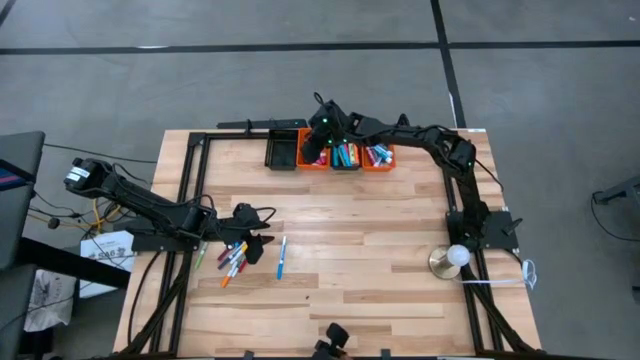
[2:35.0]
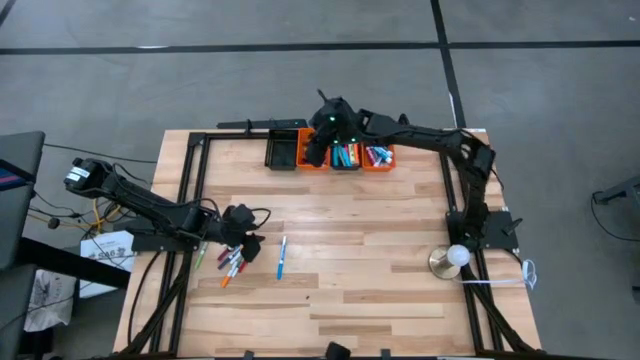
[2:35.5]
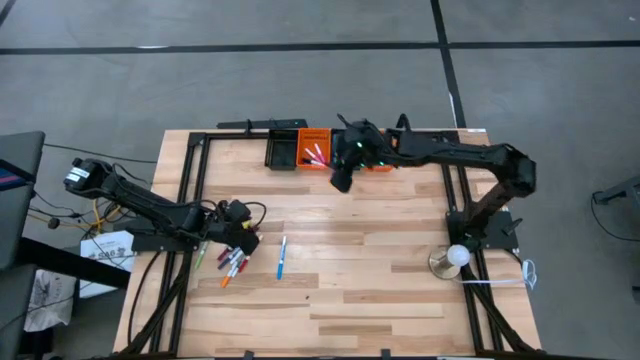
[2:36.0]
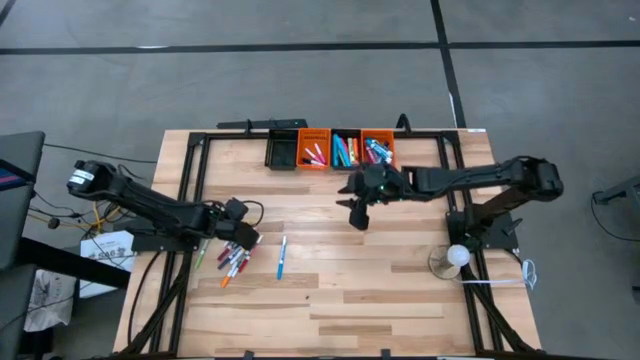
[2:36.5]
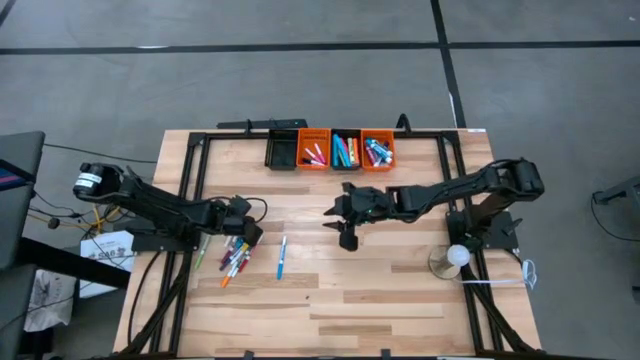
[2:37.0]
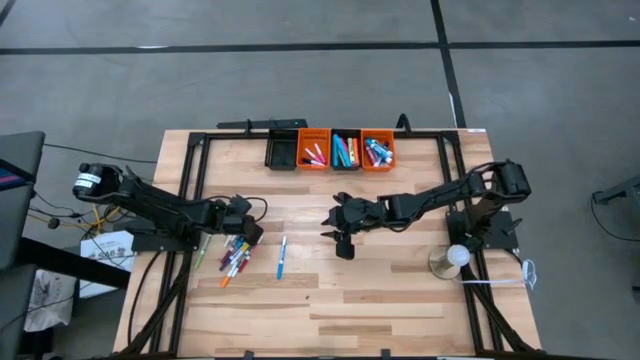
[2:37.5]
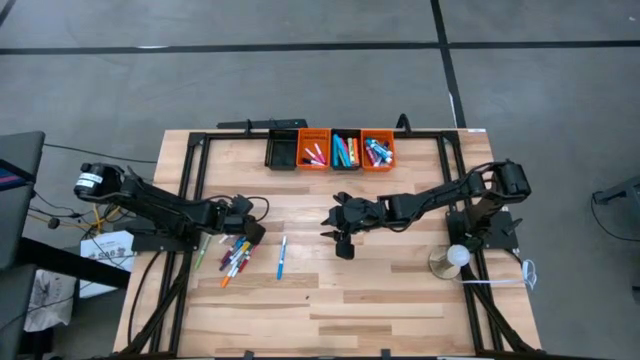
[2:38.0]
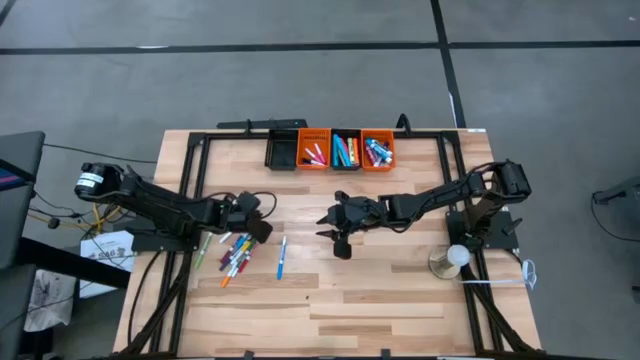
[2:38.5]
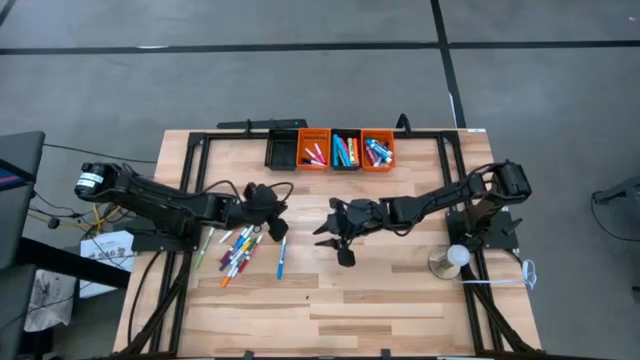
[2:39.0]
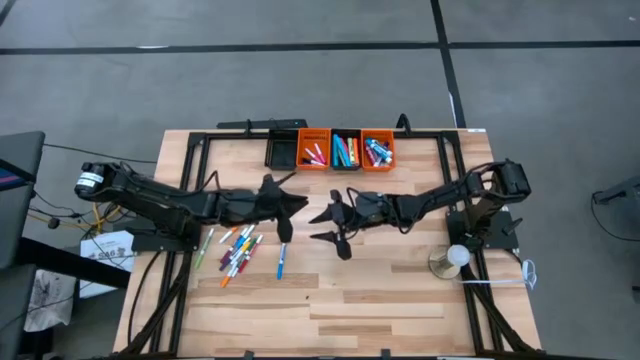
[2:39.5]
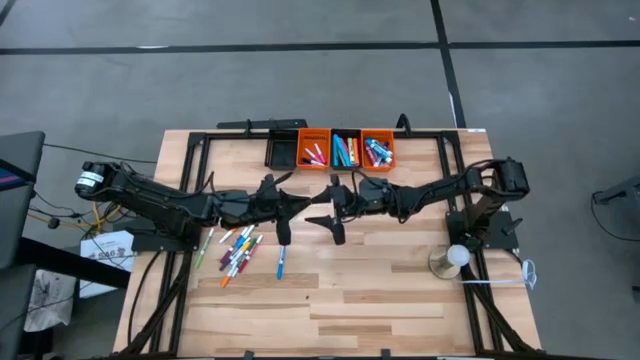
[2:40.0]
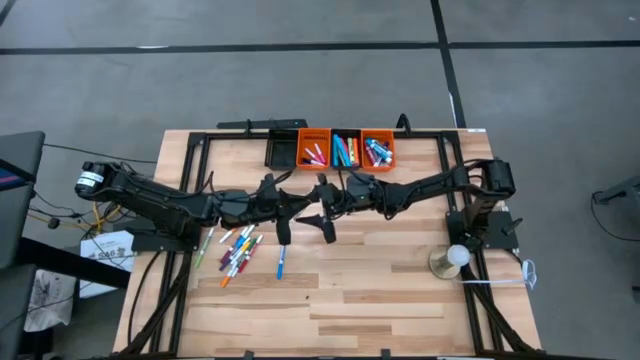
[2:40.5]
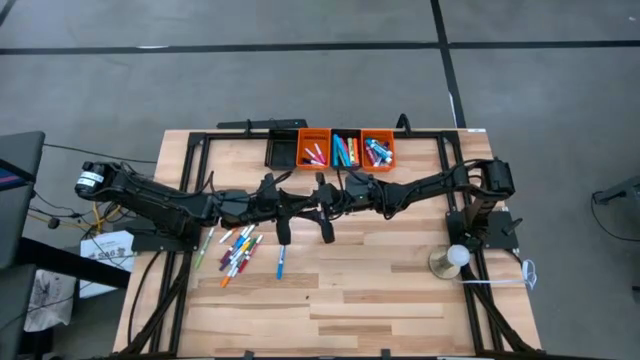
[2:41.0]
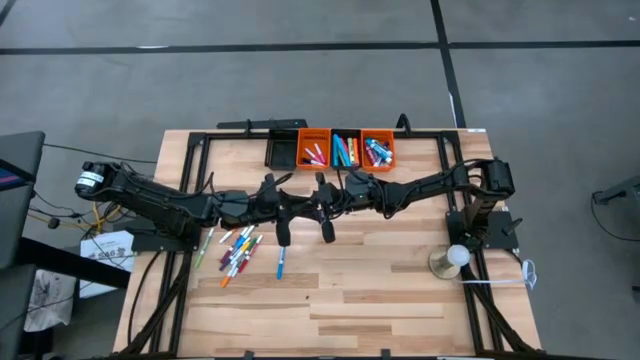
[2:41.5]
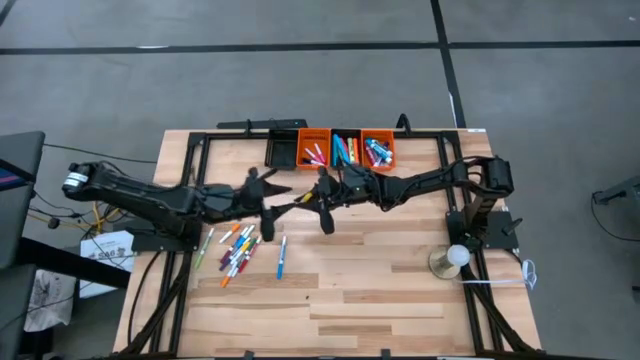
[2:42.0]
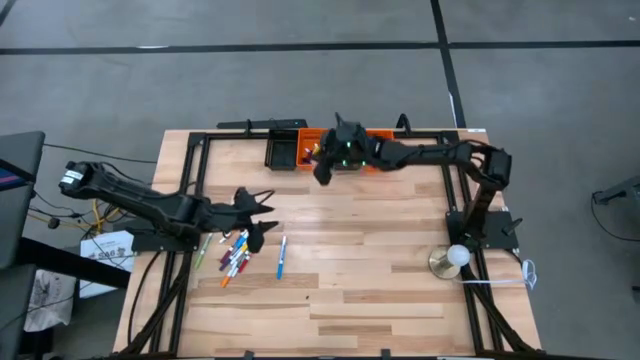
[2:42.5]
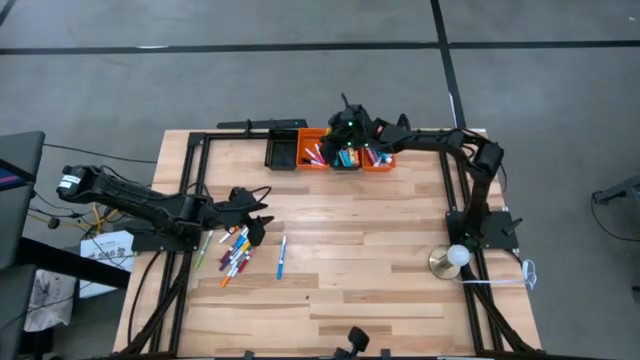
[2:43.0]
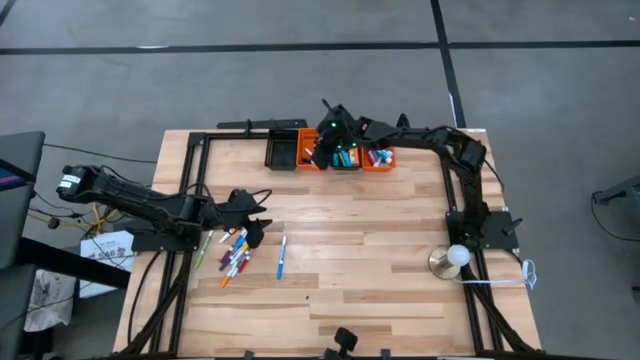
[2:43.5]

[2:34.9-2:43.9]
Task: Pick & Place Markers
Put the white yellow highlighter pen into the left orange bin

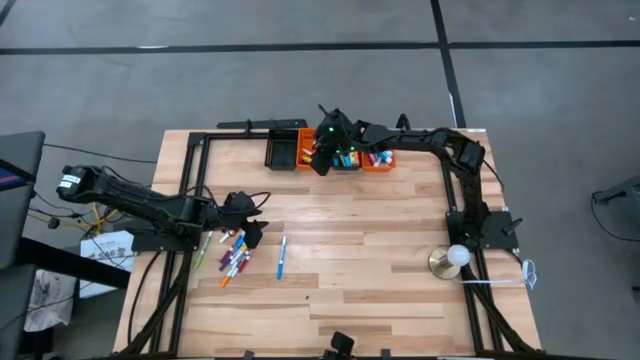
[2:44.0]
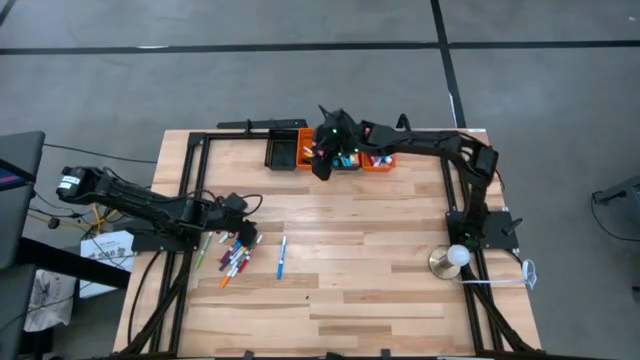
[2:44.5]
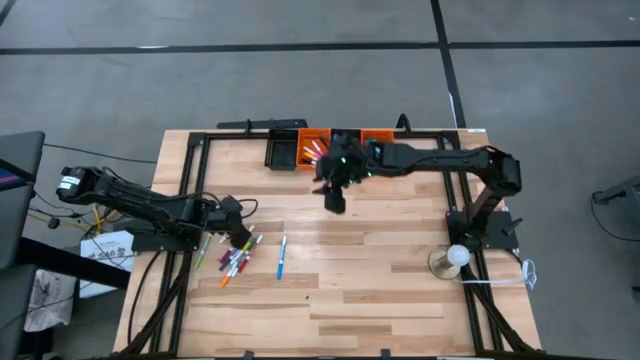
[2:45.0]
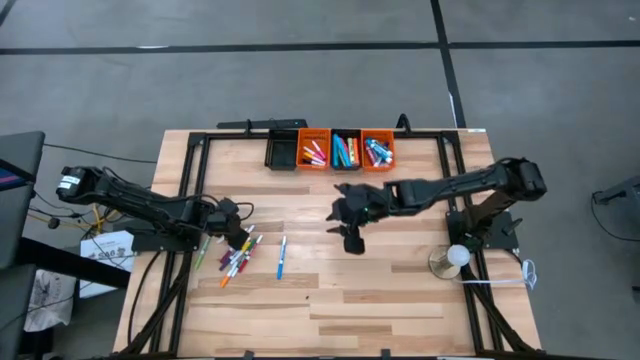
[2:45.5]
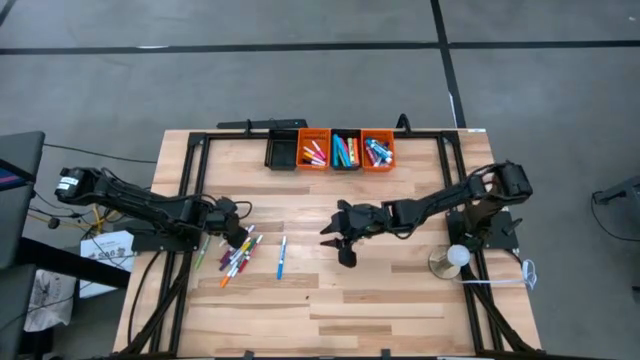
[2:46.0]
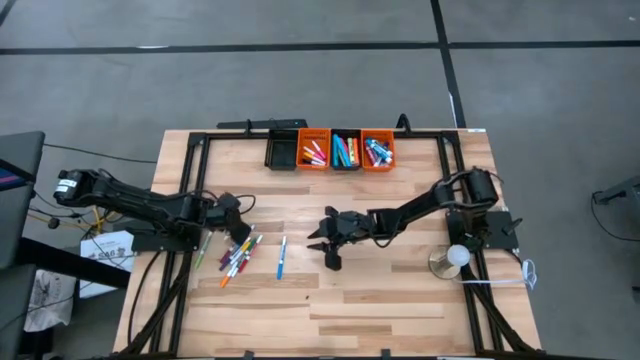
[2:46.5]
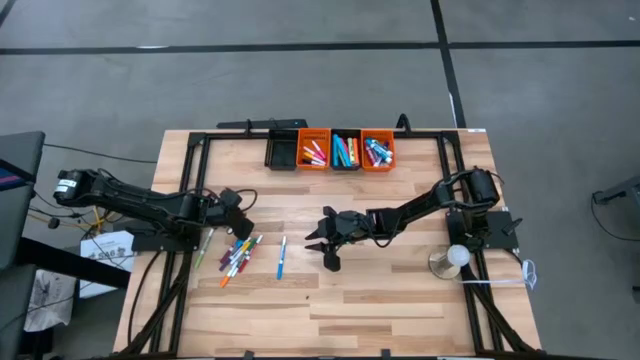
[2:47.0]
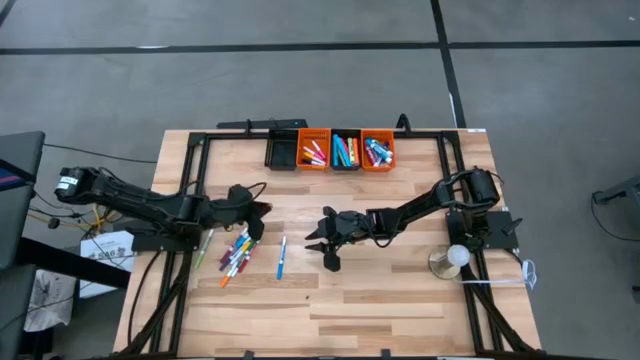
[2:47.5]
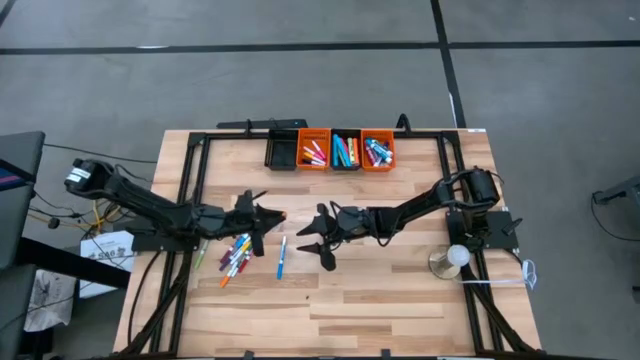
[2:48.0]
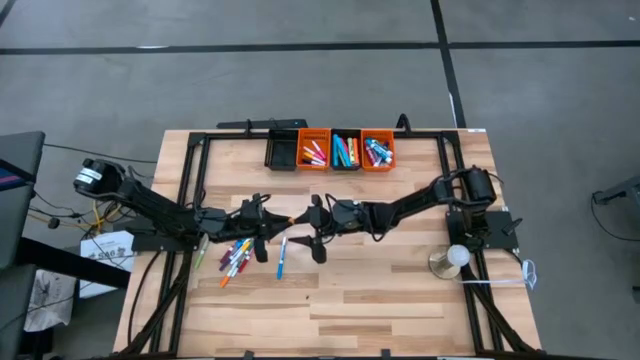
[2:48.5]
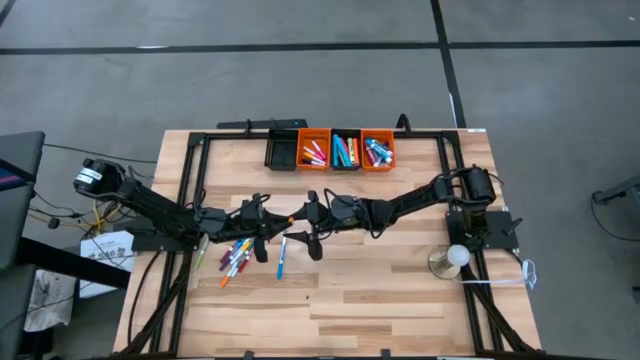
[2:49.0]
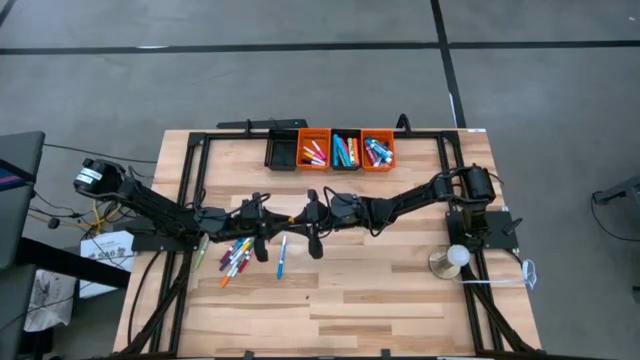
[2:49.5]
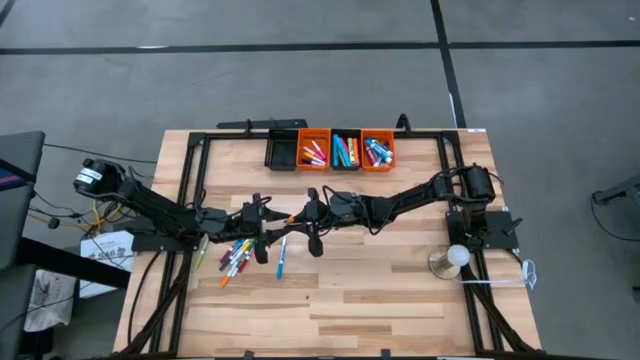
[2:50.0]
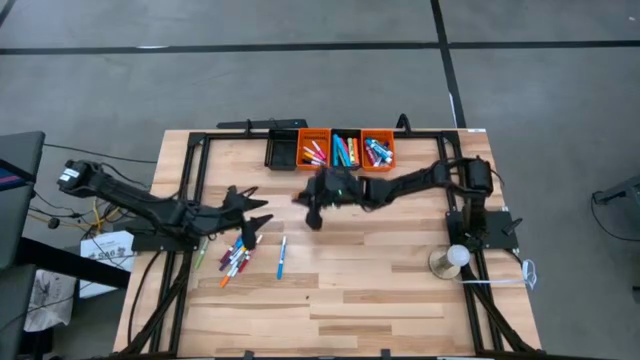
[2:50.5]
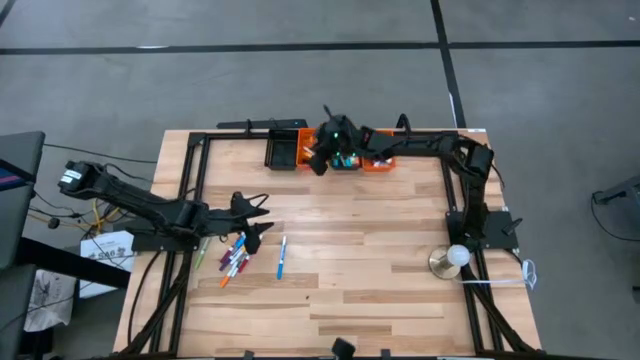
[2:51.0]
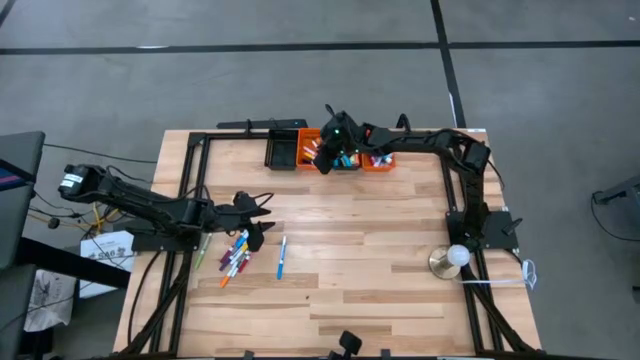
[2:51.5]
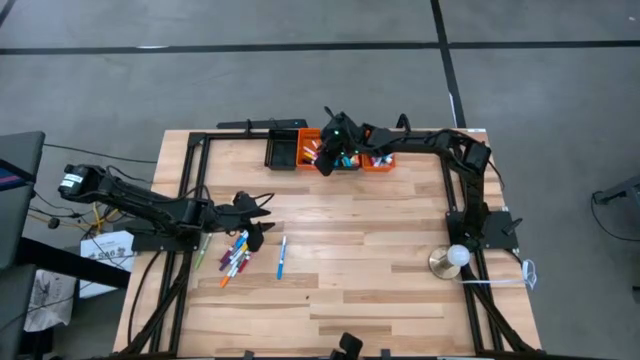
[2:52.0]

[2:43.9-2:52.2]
Put the white orange highlighter pen into the left orange bin

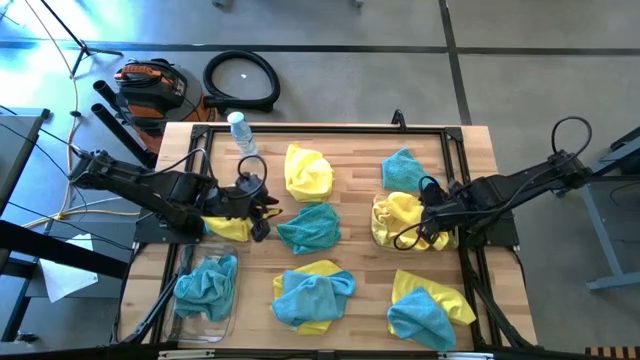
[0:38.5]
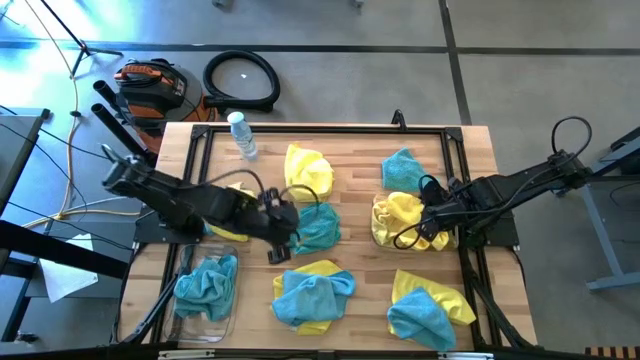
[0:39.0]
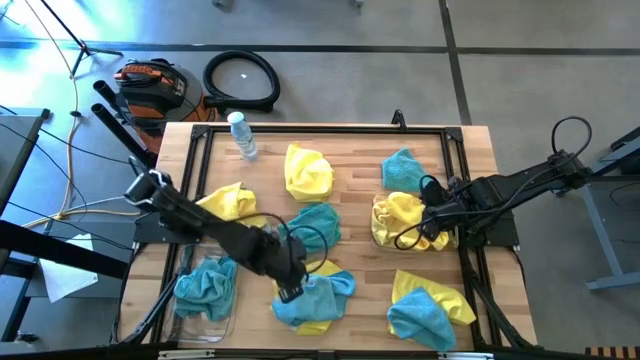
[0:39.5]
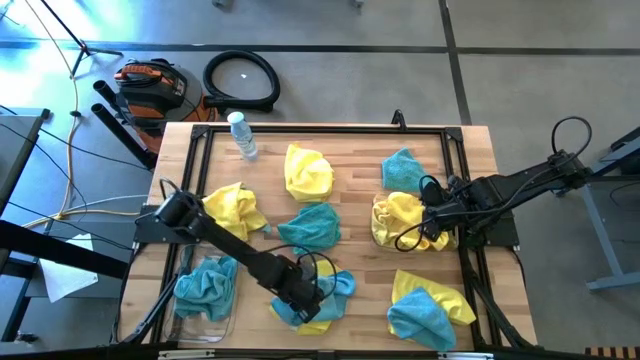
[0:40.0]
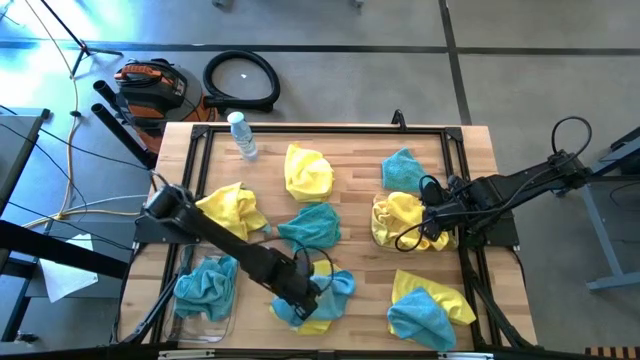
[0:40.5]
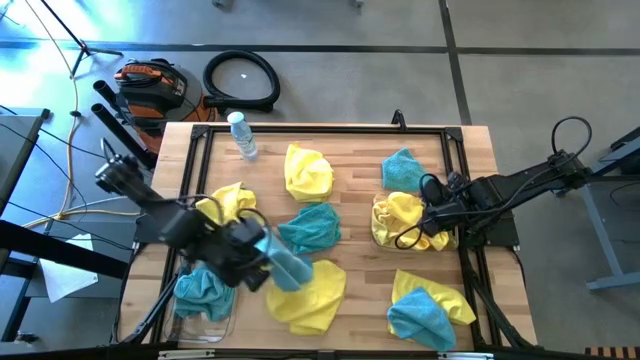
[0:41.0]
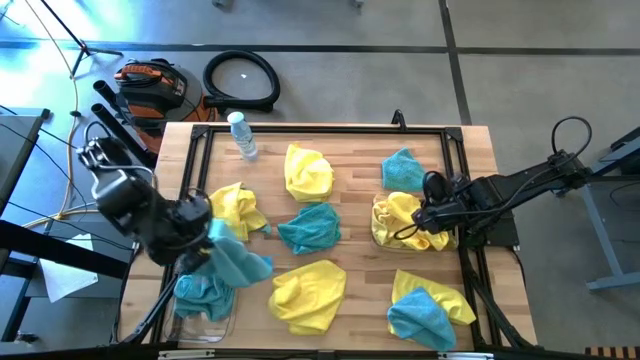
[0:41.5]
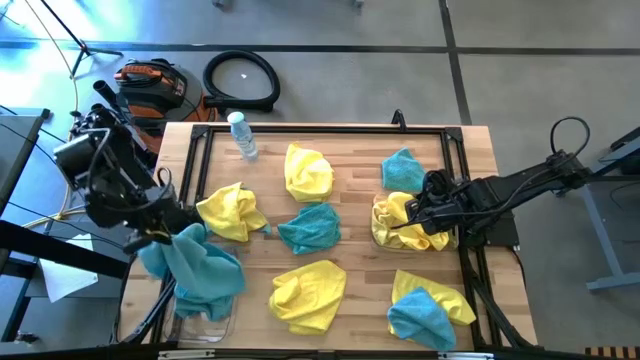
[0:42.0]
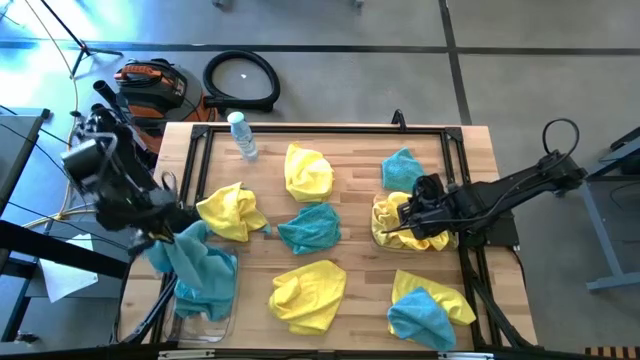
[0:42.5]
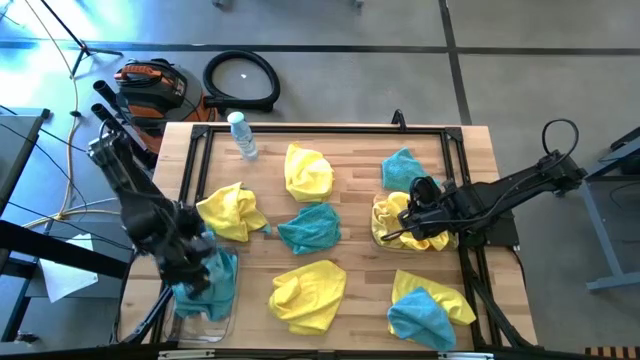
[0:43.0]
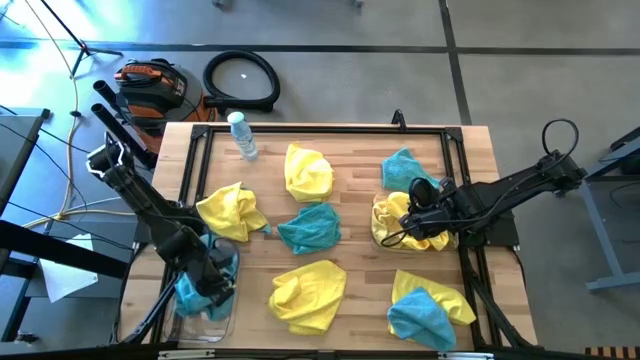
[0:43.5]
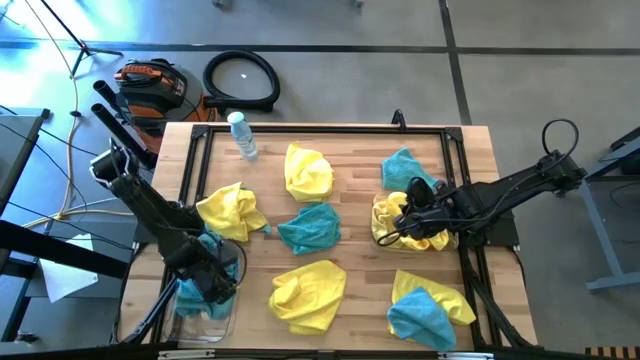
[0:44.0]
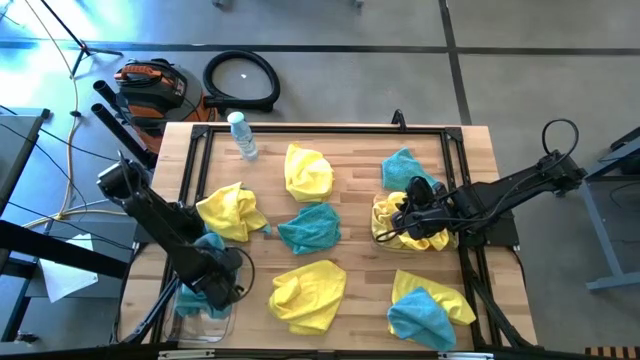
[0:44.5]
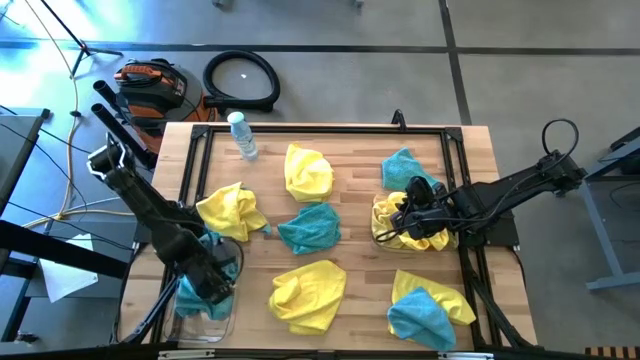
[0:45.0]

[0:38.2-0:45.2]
Task: Sort microfiber towel by color & place in baskets
Put the blue microfiber towel into the left transparent bin
